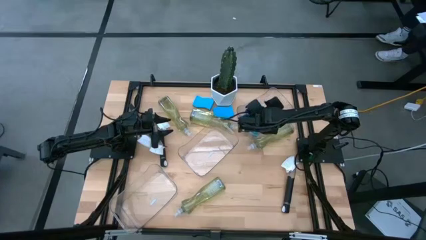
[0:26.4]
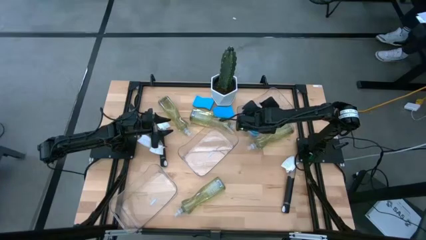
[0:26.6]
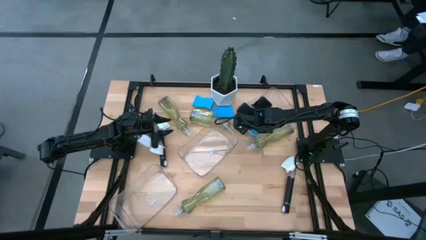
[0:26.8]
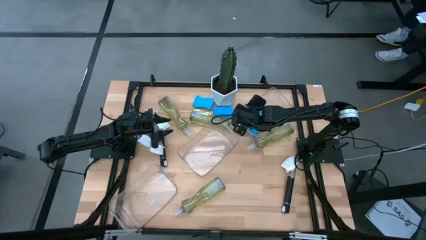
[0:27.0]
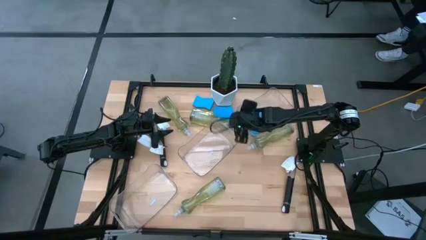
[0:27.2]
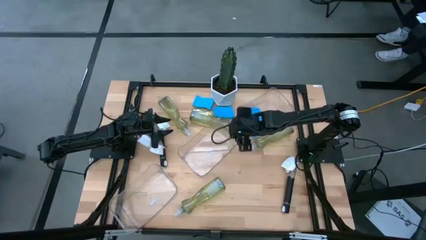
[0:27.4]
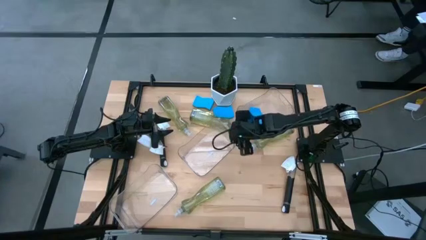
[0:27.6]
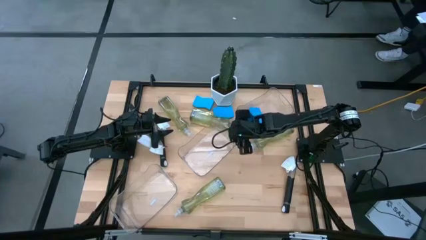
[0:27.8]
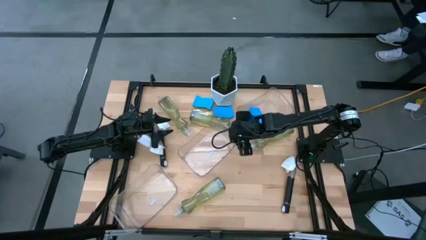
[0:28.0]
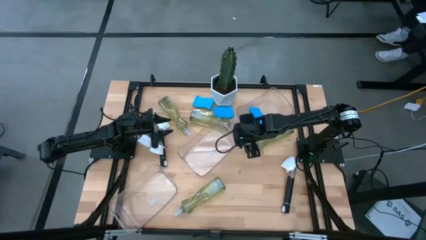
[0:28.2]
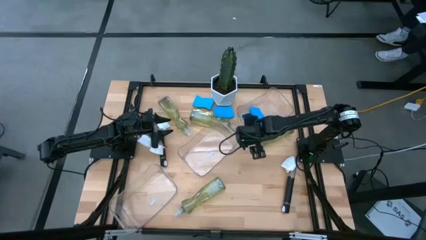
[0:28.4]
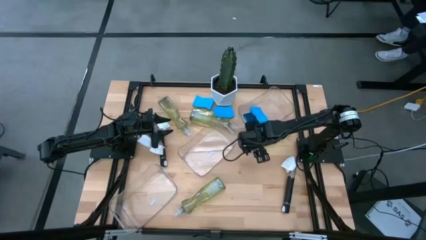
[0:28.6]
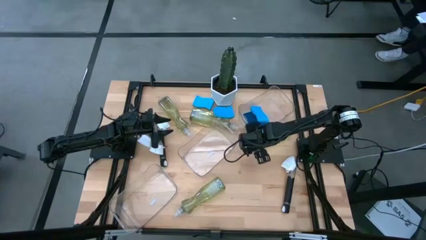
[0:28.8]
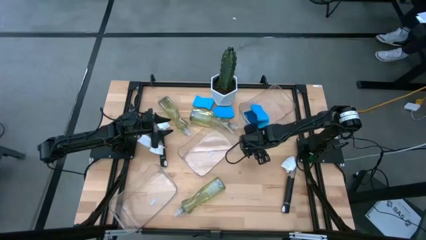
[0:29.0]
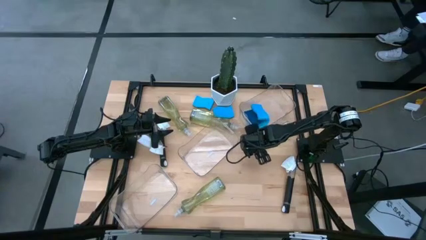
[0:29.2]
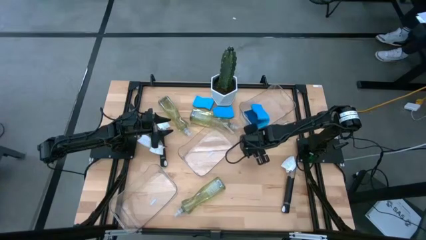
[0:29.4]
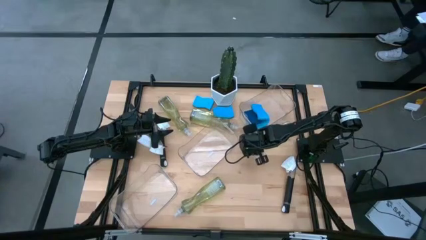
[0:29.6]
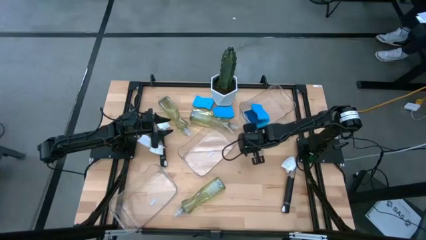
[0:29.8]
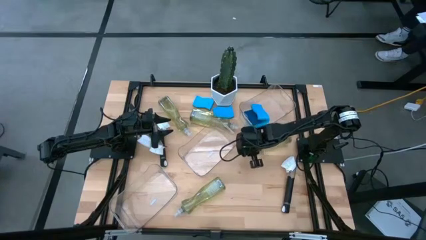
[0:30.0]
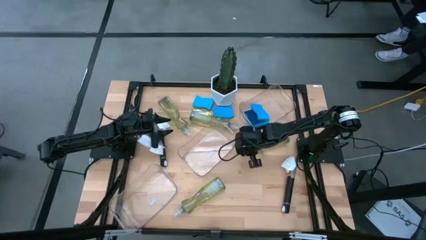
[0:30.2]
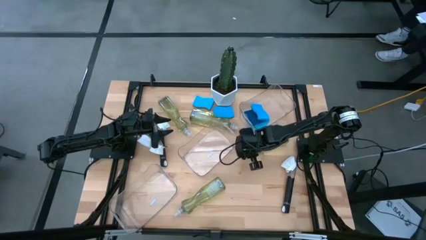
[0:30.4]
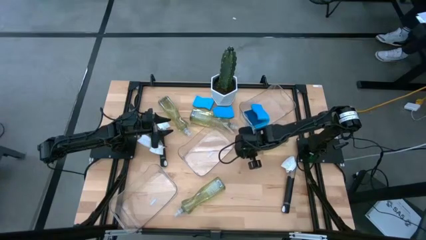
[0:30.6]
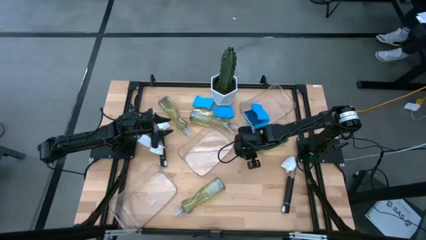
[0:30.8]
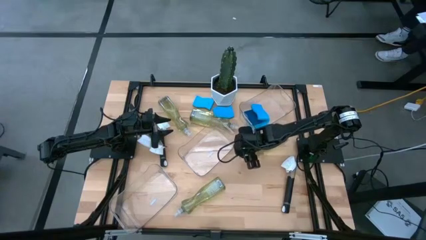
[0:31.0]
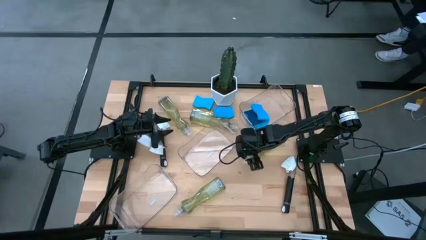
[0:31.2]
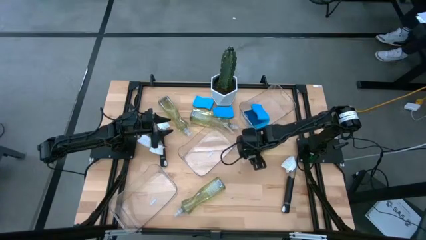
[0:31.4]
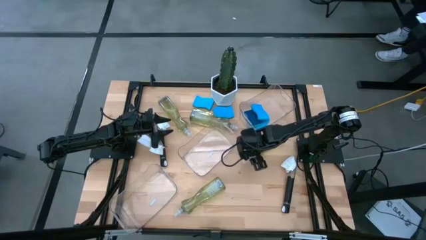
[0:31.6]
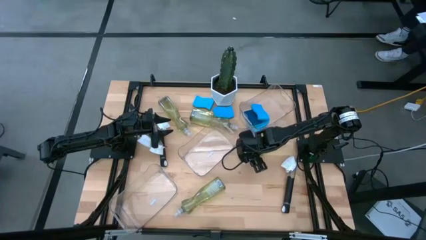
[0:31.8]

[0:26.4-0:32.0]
Task: Pick & Place Kitchen Sink Supplies
Put the green soap dispenser into the middle transparent bin

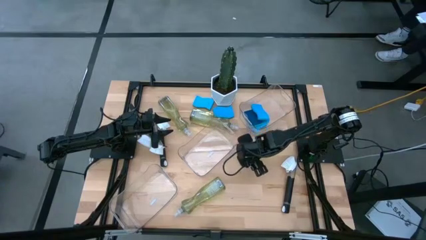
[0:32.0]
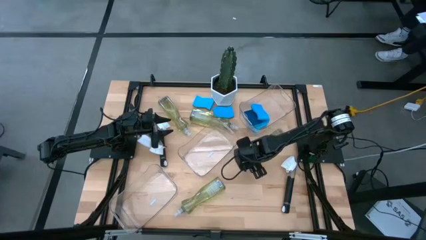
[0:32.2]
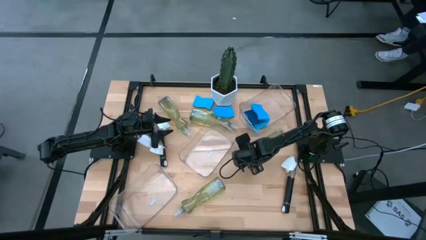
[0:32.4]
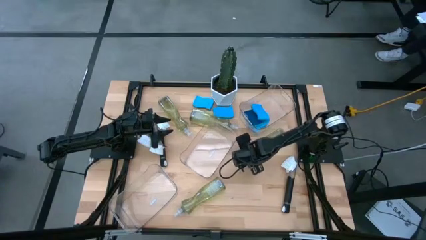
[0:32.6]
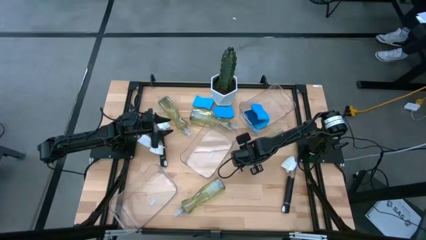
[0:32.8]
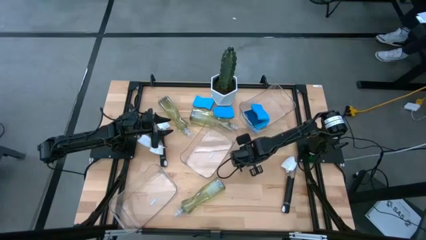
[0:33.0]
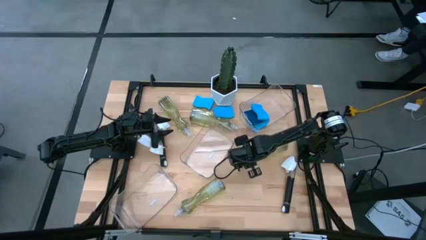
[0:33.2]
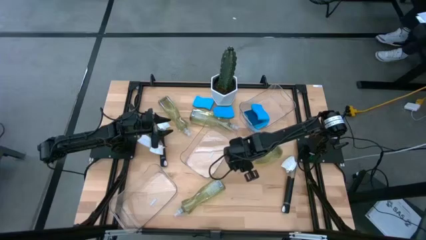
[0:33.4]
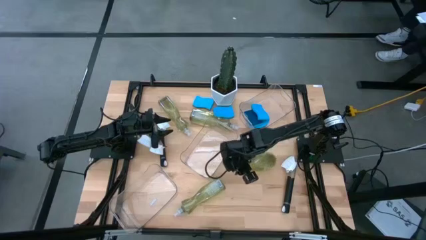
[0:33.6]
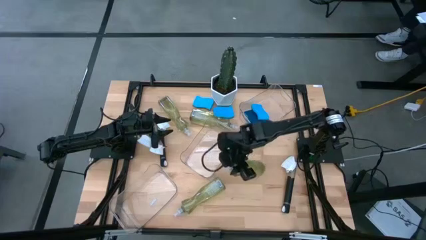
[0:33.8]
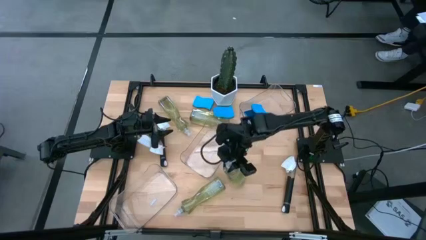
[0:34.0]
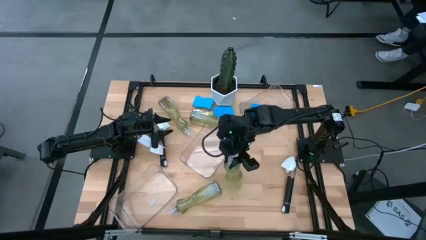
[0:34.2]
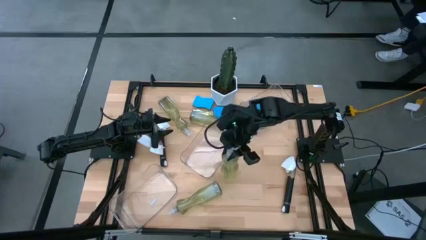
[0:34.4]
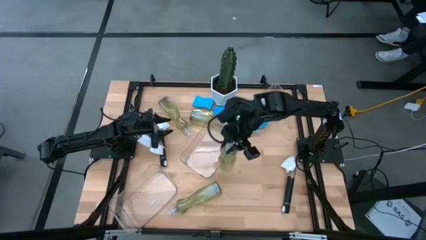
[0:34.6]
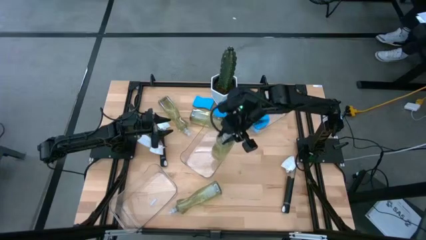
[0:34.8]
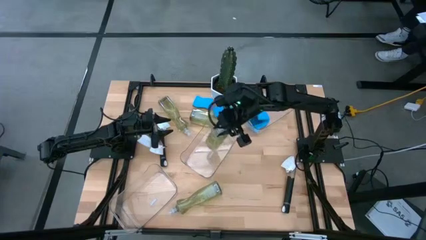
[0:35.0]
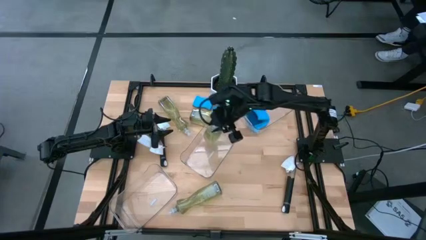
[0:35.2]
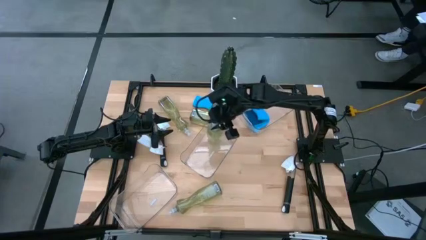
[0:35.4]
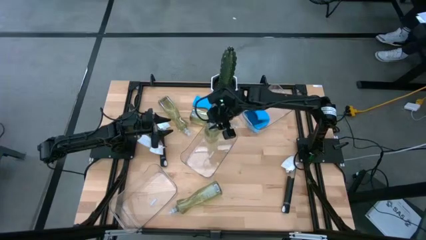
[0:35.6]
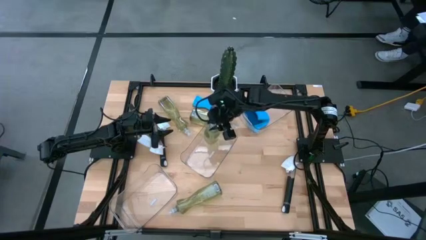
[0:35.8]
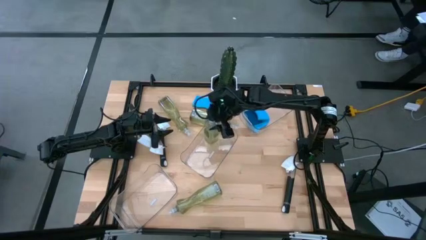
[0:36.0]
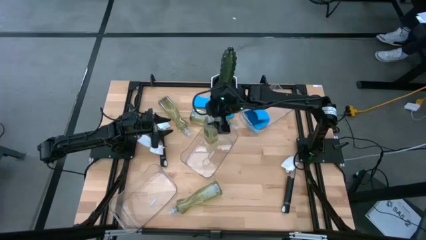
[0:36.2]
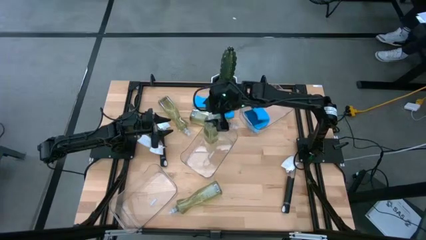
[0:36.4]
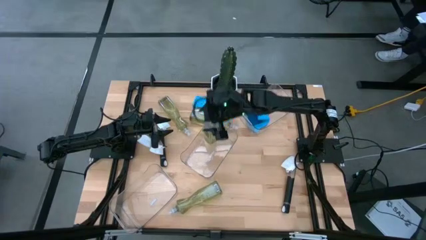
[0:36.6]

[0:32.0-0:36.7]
Put the green soap dispenser into the middle transparent bin

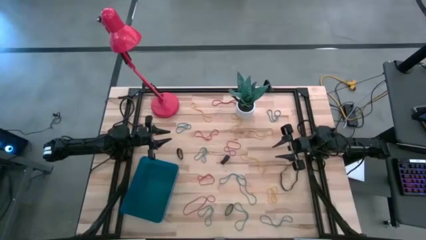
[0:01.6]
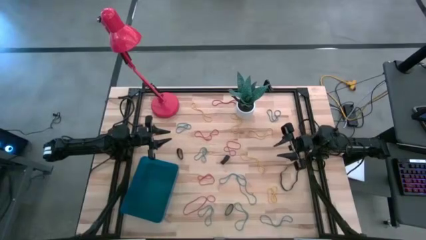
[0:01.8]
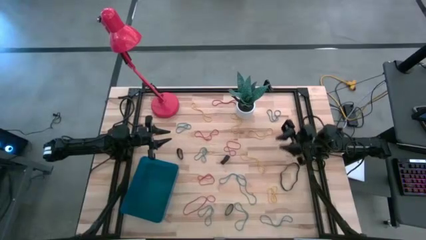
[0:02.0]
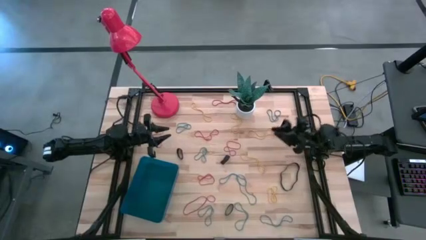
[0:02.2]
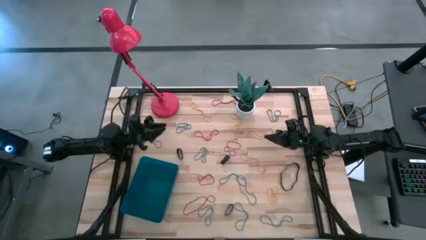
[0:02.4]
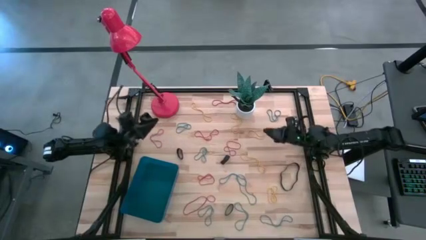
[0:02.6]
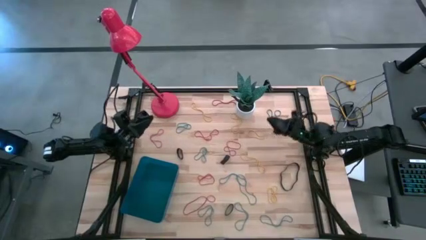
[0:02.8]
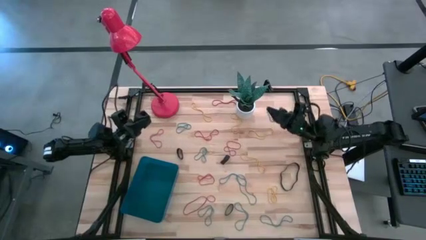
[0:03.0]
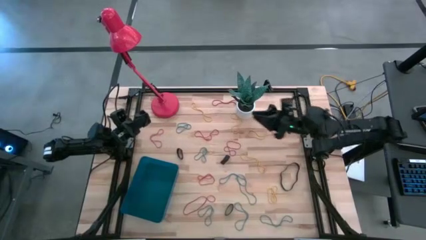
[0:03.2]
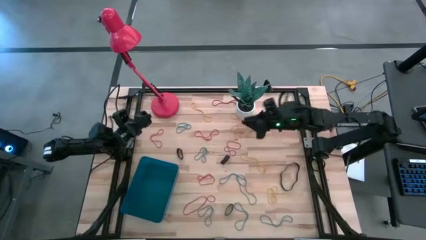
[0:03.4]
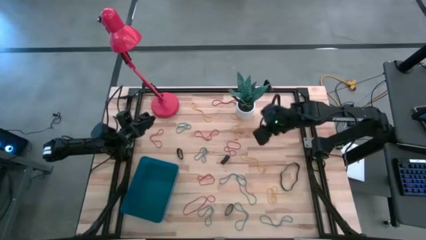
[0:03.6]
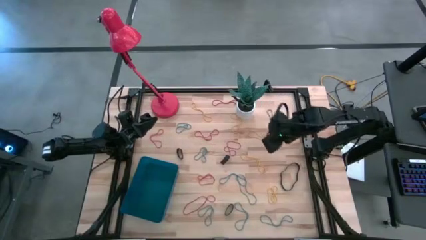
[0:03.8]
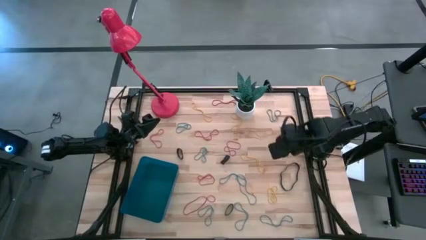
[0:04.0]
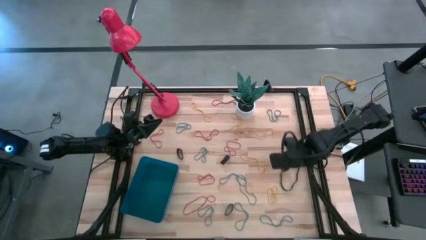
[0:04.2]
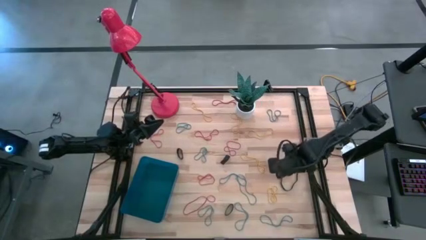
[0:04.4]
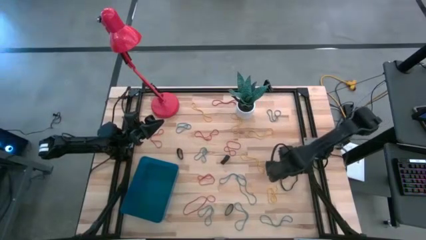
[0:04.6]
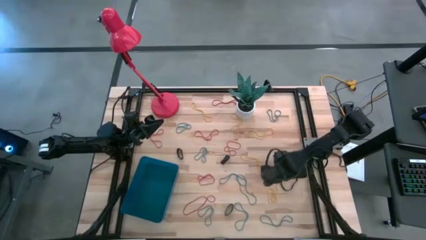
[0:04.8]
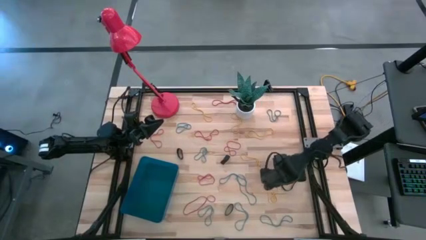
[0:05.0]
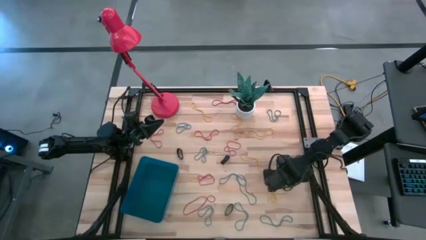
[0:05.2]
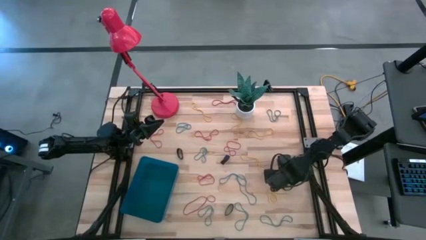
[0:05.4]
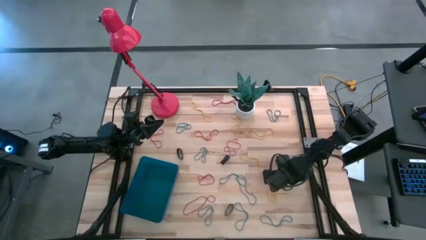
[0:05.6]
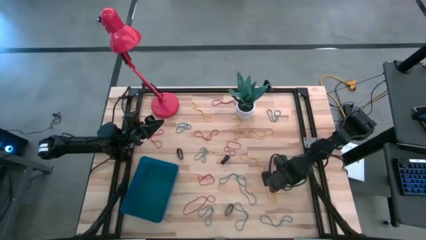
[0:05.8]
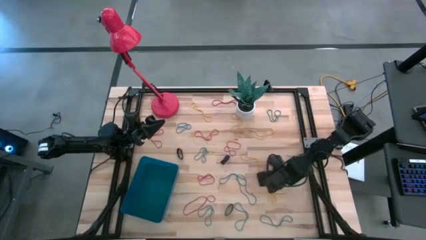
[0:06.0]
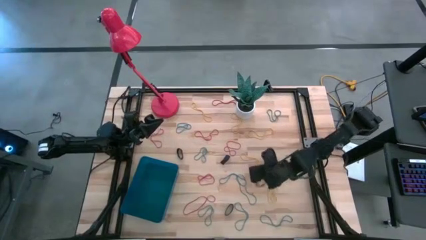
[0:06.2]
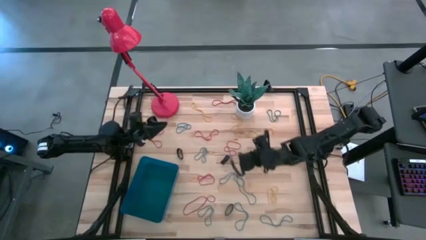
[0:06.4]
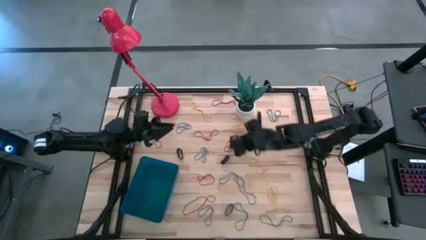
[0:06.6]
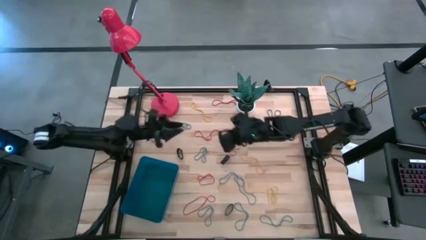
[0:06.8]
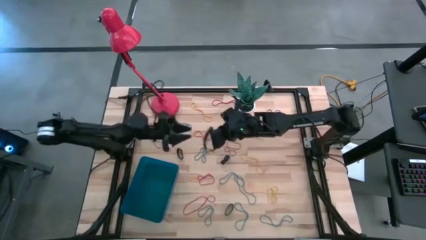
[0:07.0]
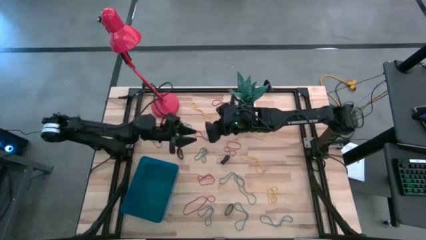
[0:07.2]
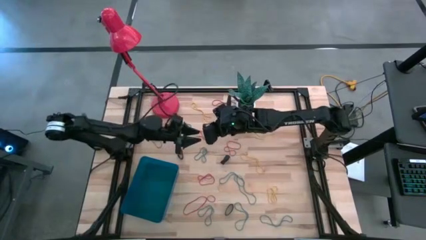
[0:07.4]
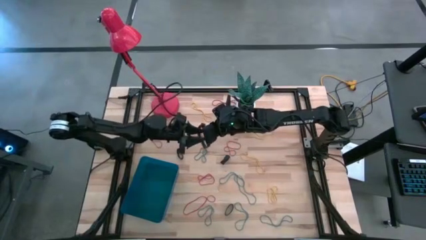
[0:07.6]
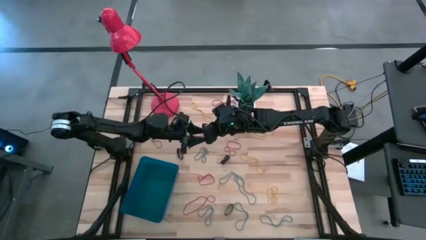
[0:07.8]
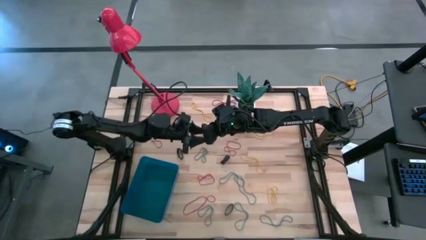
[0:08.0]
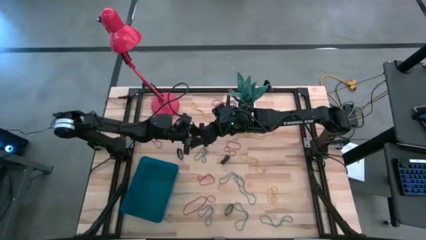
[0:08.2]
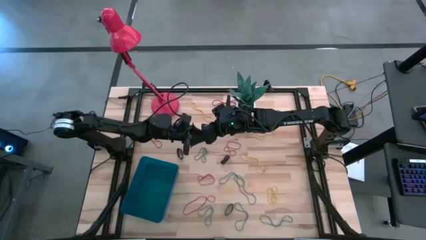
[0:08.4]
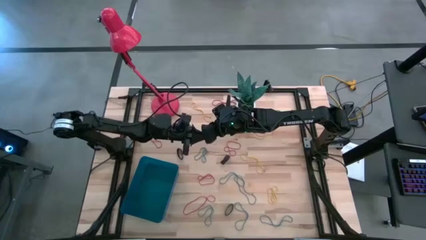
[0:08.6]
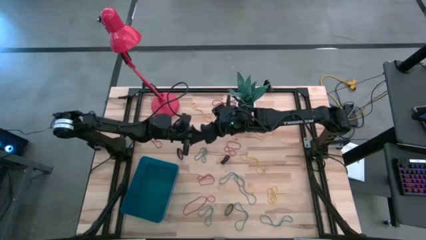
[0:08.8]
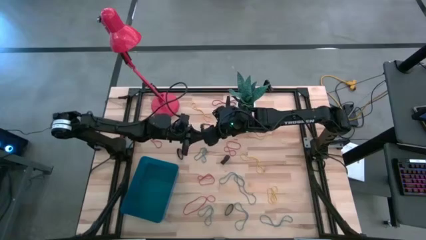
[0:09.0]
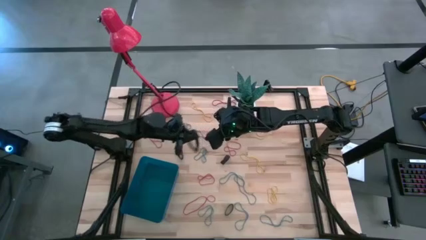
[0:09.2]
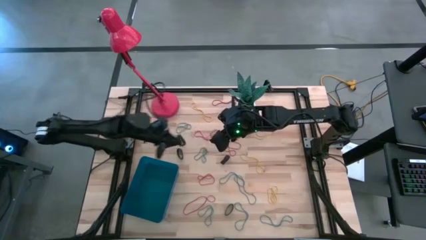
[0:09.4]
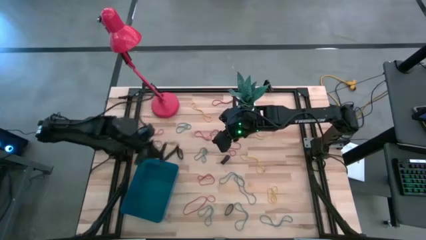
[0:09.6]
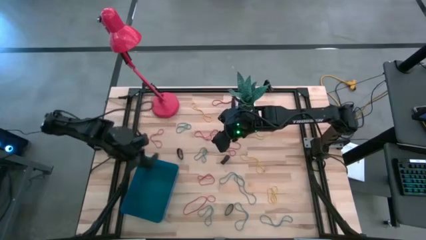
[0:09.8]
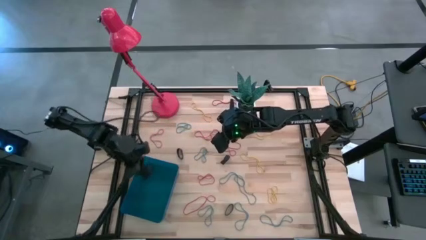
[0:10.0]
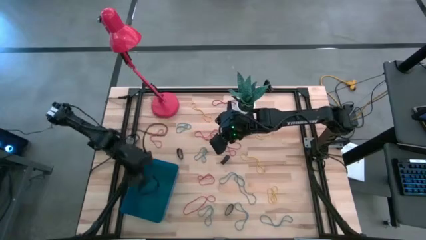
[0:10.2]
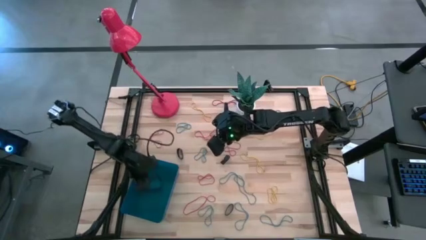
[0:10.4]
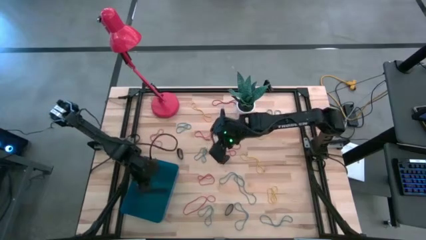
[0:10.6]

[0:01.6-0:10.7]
Task: Pick and place rubber bands into bin
Put the black rubber band into the blue bin
